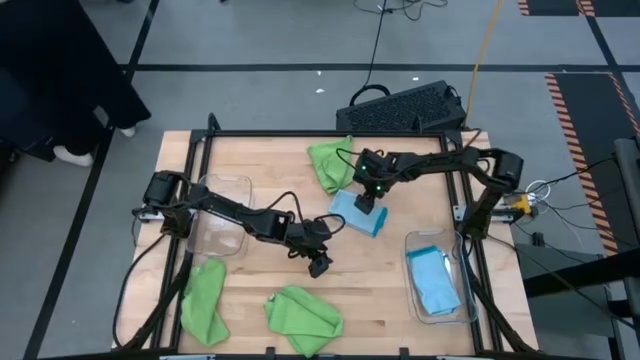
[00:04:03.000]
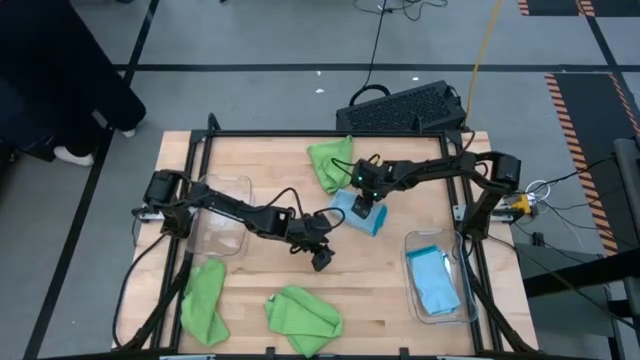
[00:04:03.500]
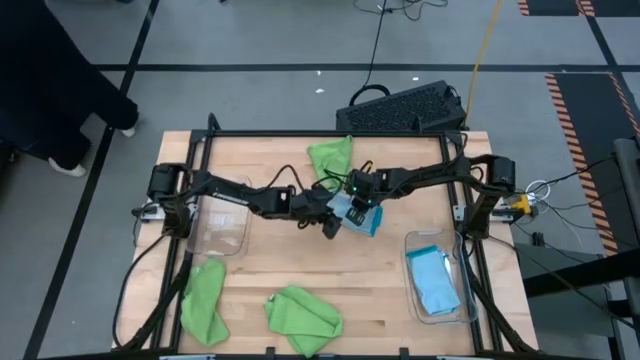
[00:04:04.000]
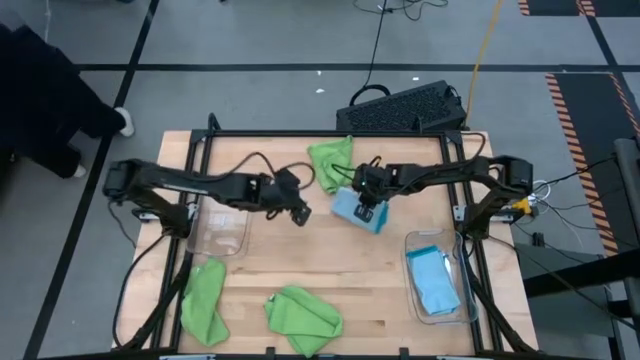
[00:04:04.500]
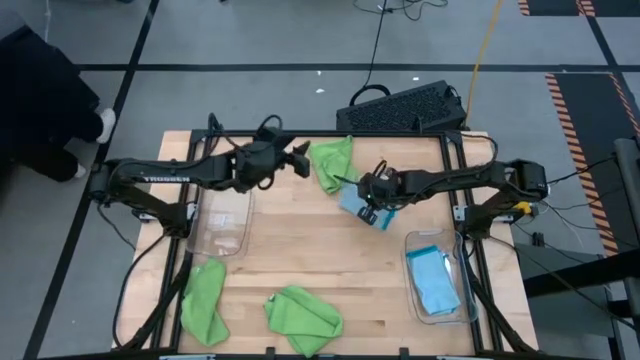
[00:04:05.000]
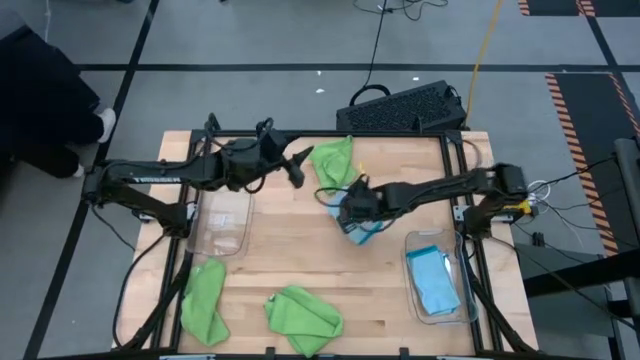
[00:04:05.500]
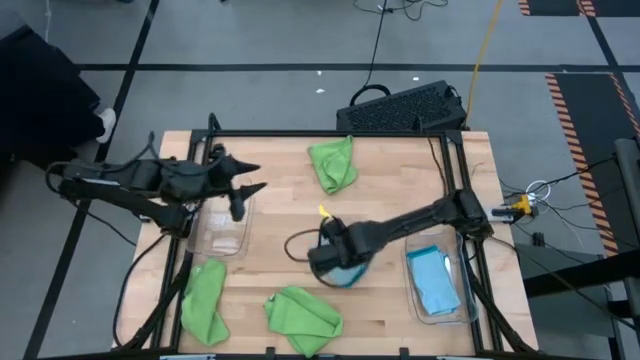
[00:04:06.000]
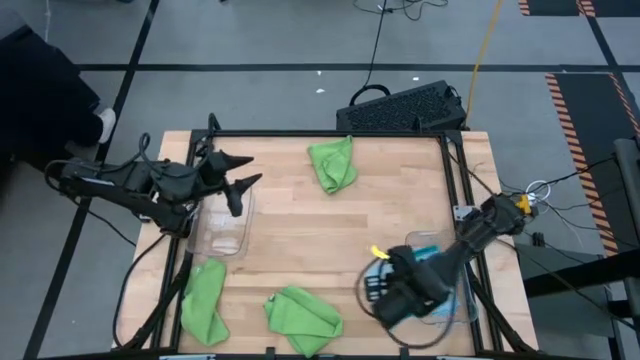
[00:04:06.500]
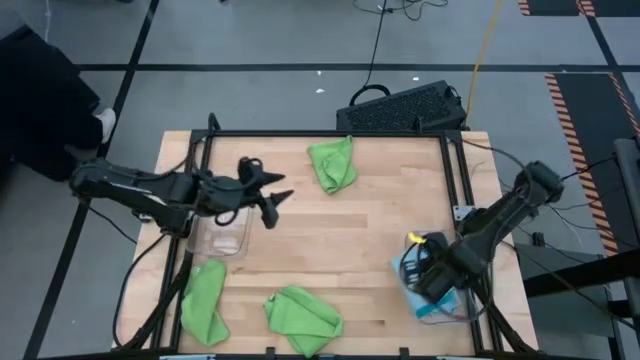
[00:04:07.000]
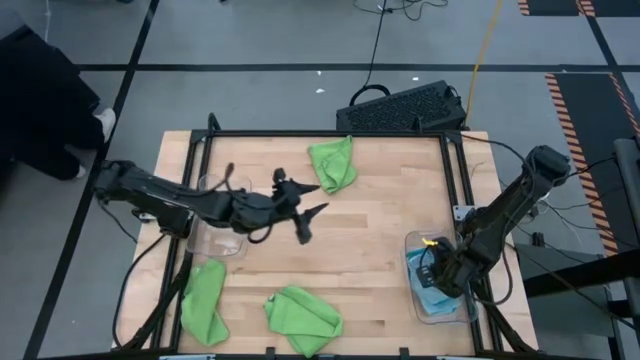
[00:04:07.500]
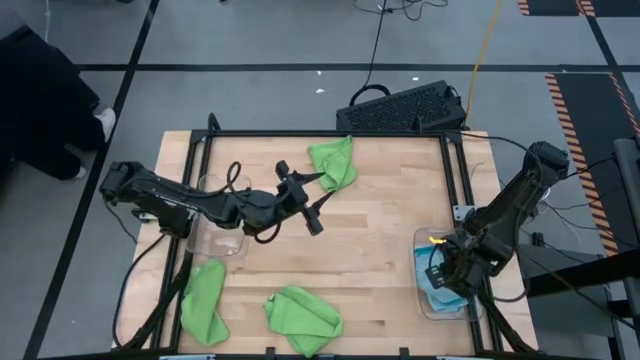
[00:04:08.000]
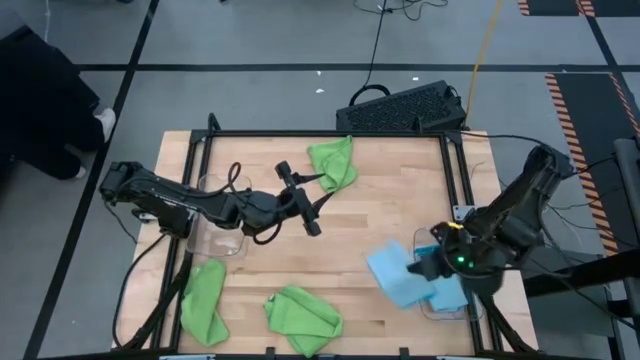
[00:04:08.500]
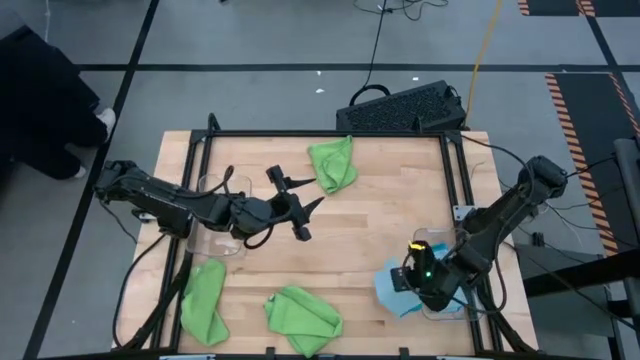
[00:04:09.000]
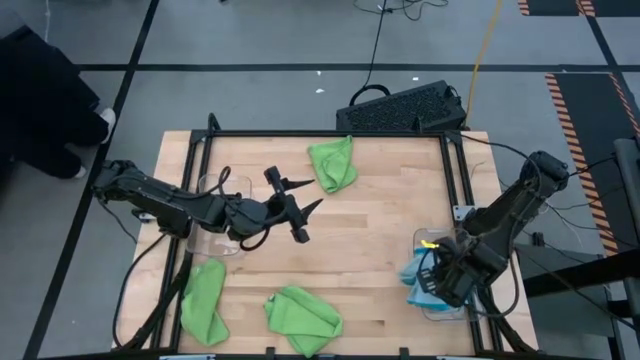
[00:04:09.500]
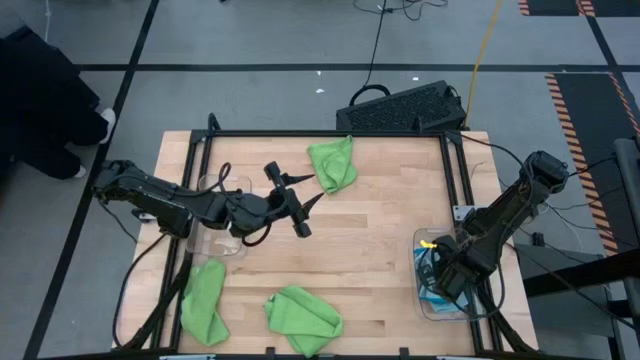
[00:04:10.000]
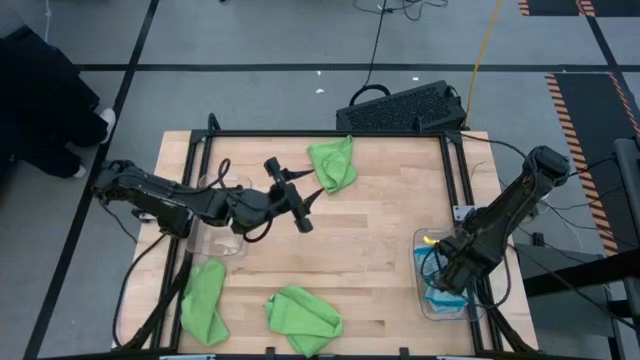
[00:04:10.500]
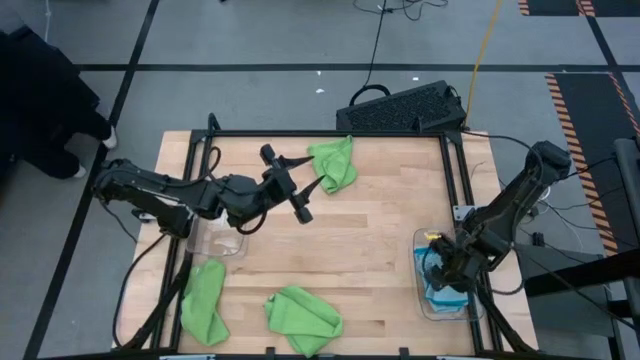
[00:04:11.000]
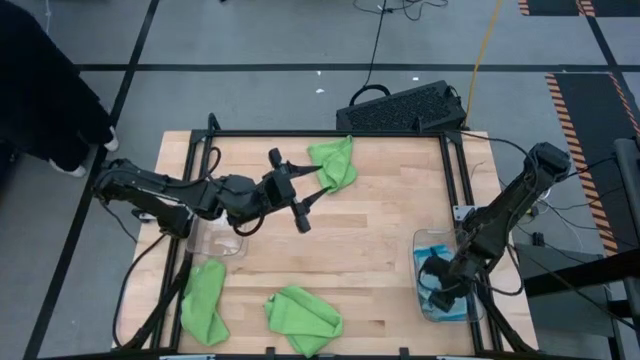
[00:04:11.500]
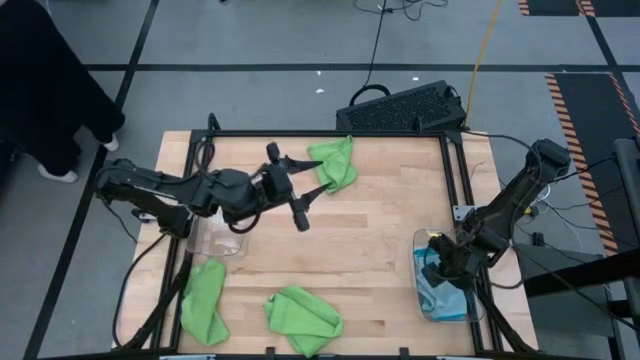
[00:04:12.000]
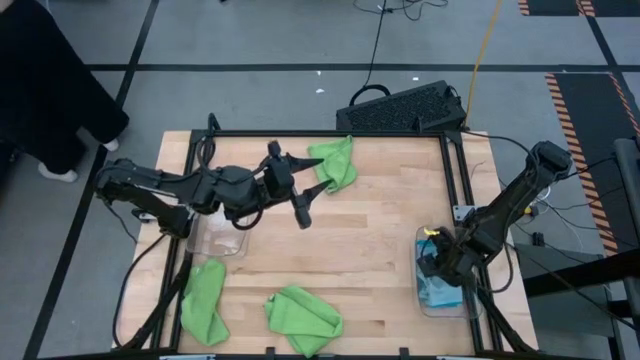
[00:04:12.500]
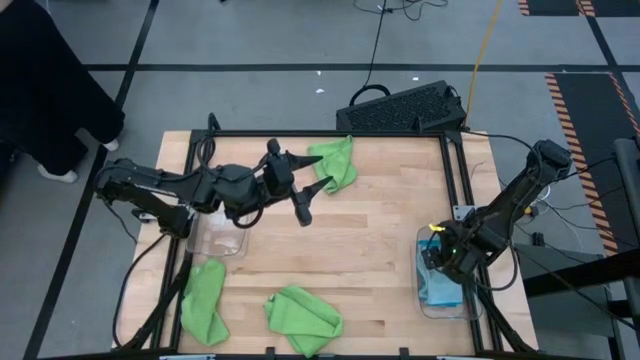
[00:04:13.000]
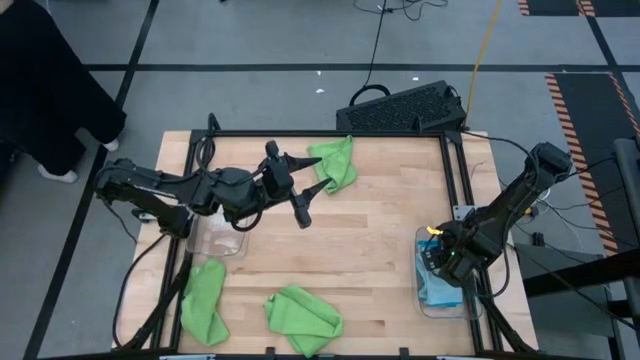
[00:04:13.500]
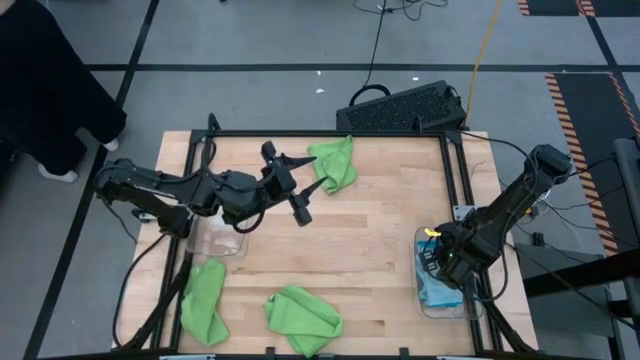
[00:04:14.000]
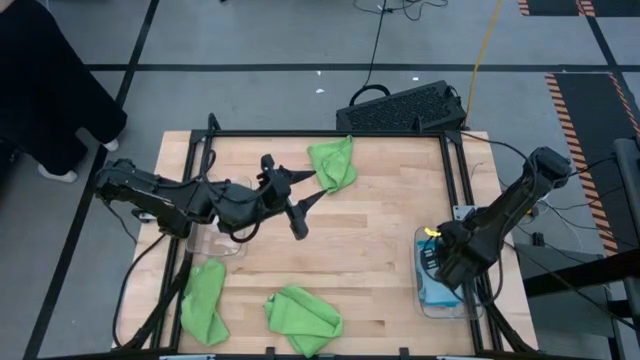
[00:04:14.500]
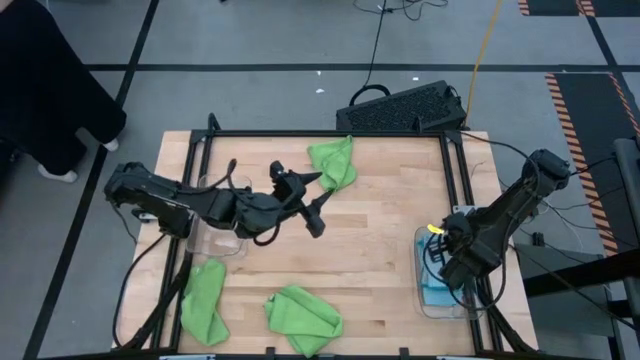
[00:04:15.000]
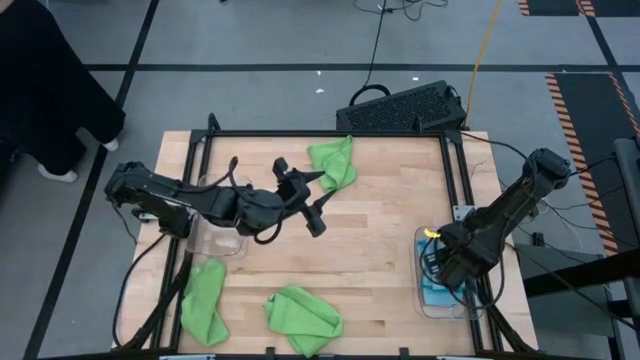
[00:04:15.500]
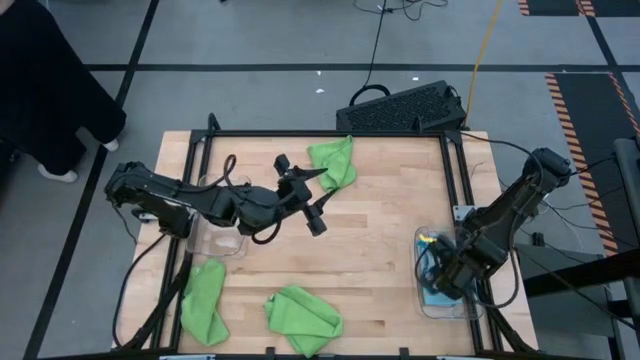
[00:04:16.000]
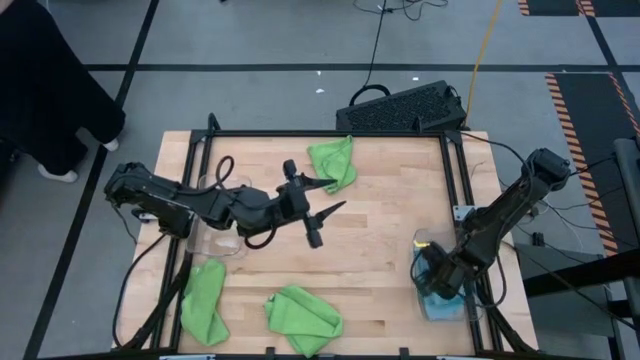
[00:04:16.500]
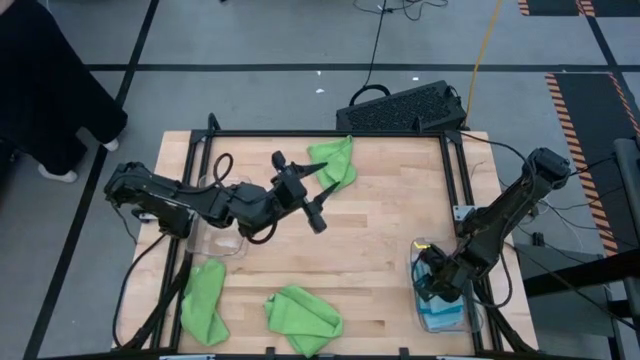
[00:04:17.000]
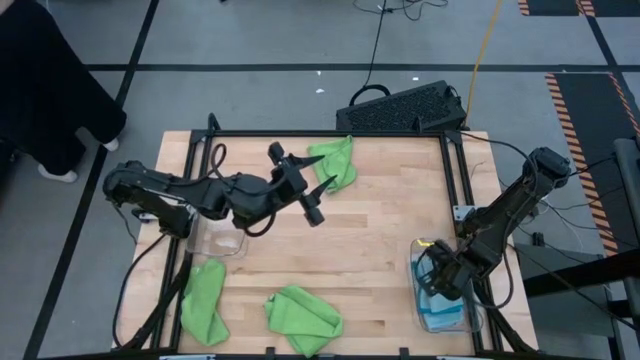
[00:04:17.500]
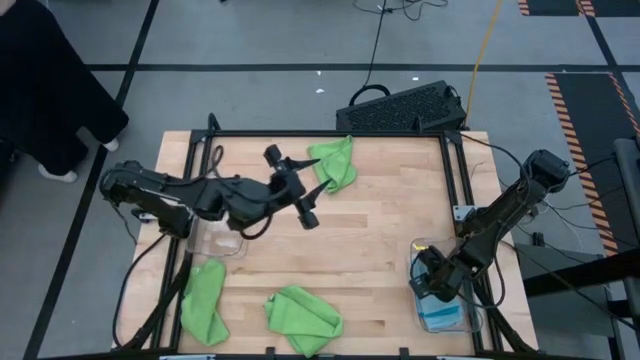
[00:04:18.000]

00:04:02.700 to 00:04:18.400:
Task: Sort microfiber towel by color & place in baskets
Put the folded blue microfiber towel into the right transparent bin

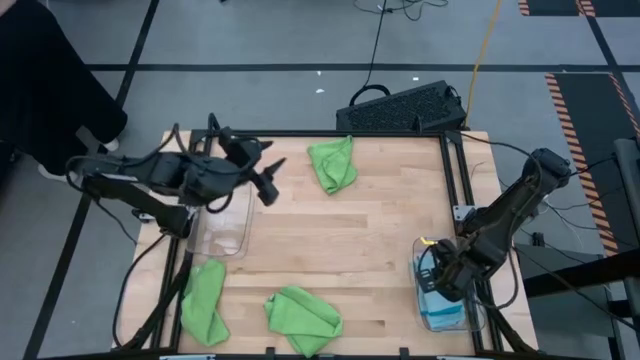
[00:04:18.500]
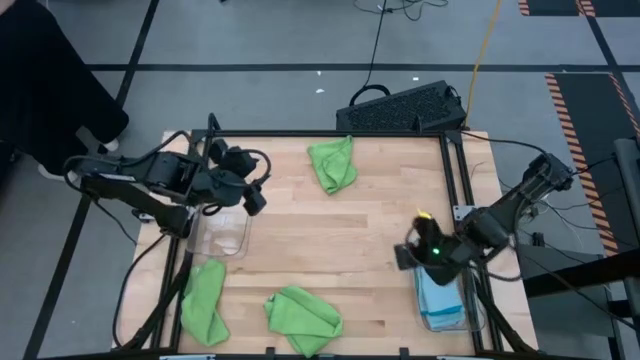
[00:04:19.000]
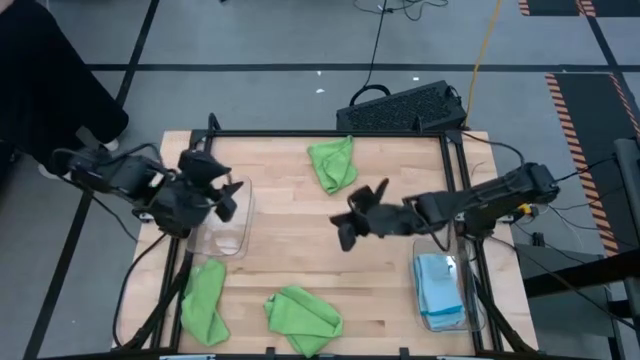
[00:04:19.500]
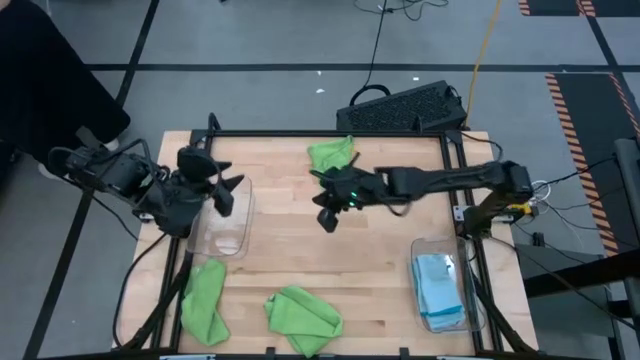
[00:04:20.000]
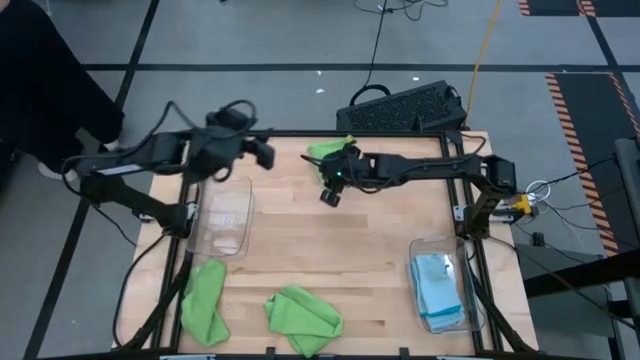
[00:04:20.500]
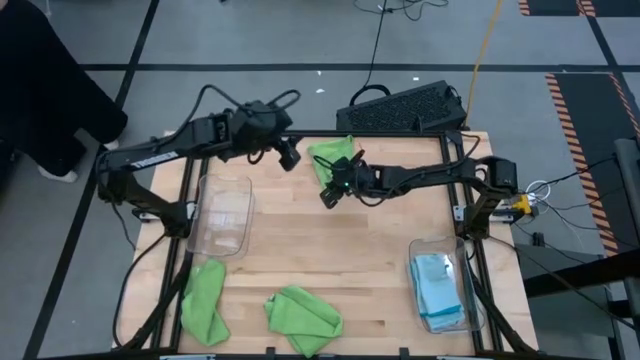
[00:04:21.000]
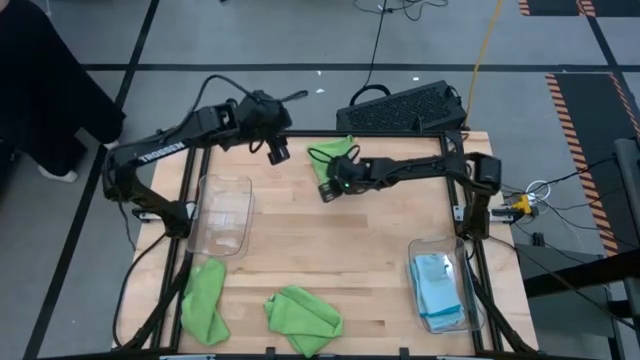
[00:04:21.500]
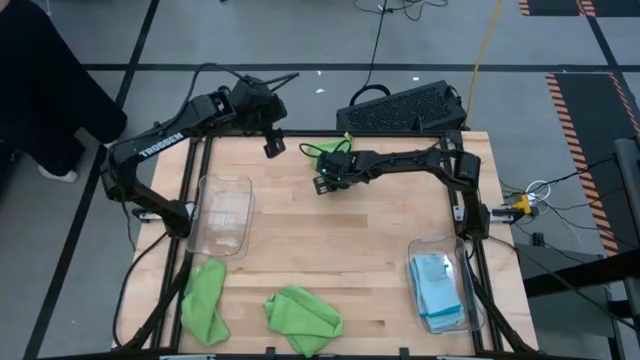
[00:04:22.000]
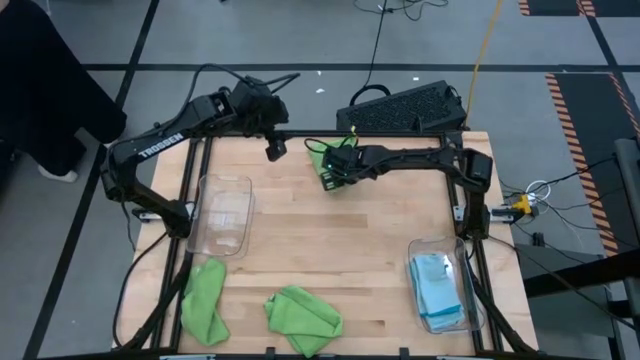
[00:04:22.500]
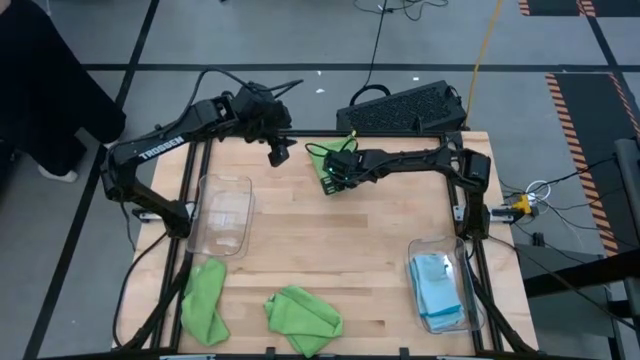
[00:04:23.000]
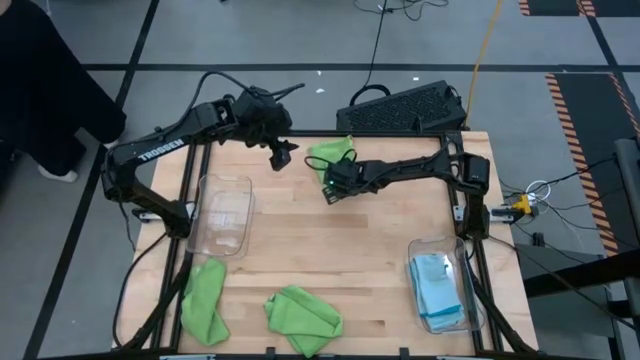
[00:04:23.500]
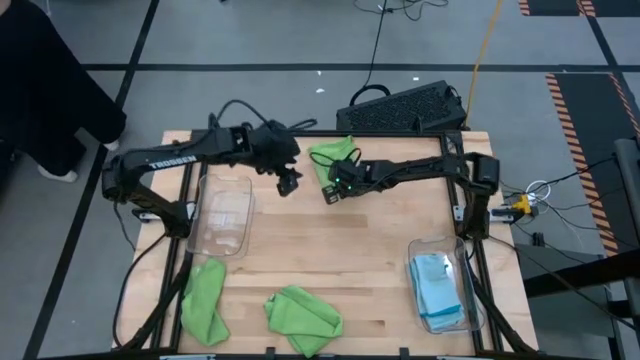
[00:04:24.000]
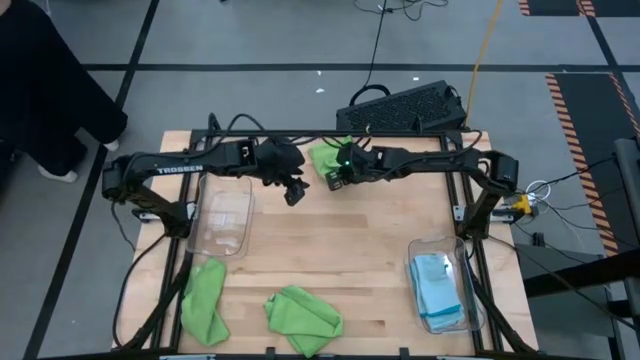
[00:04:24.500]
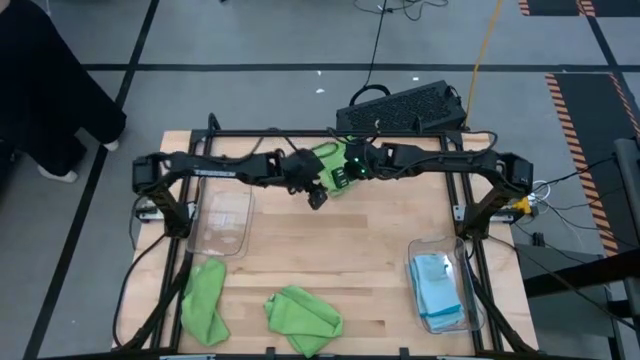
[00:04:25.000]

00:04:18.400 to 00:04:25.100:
Fold the top green microfiber towel
